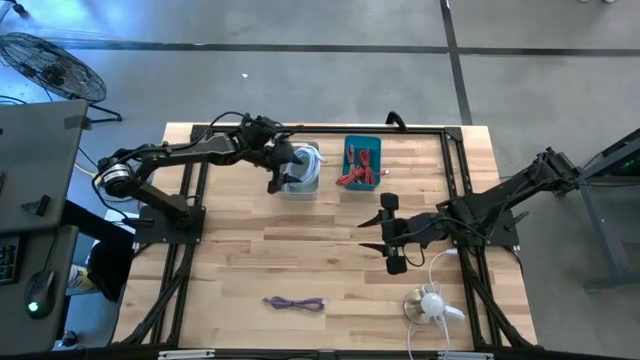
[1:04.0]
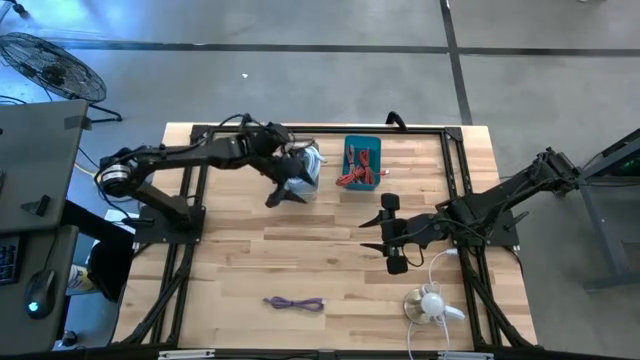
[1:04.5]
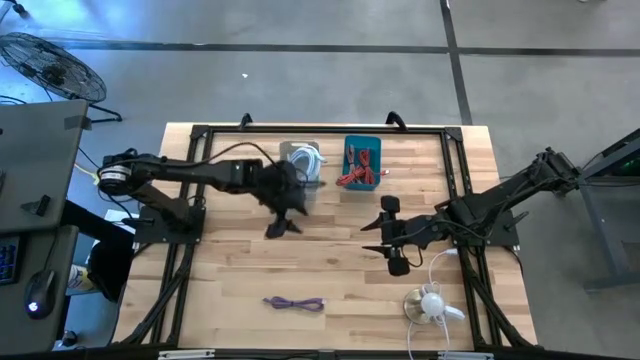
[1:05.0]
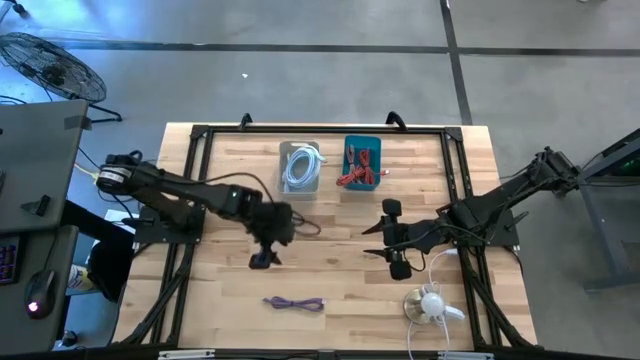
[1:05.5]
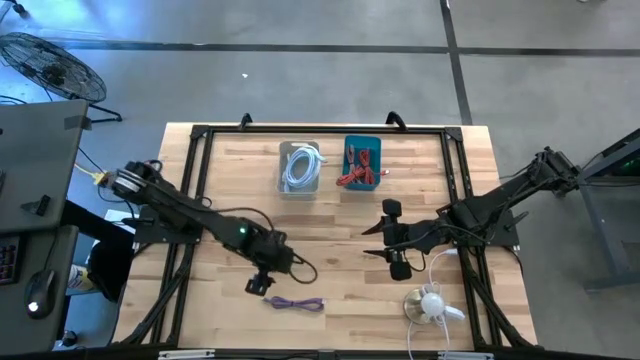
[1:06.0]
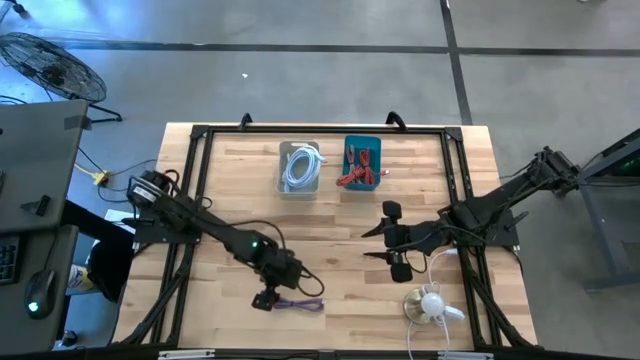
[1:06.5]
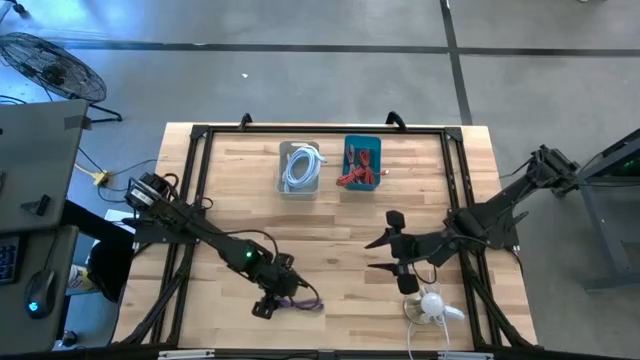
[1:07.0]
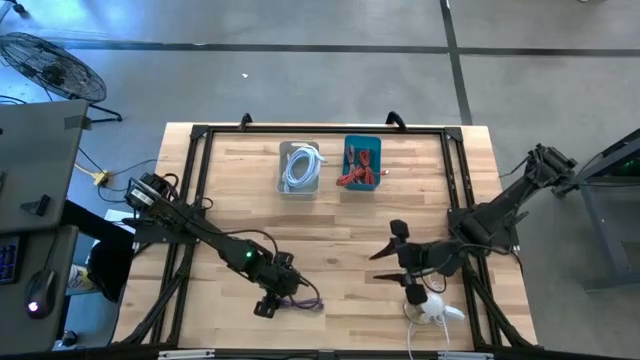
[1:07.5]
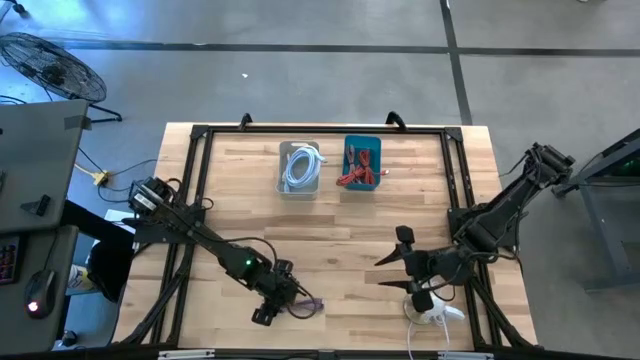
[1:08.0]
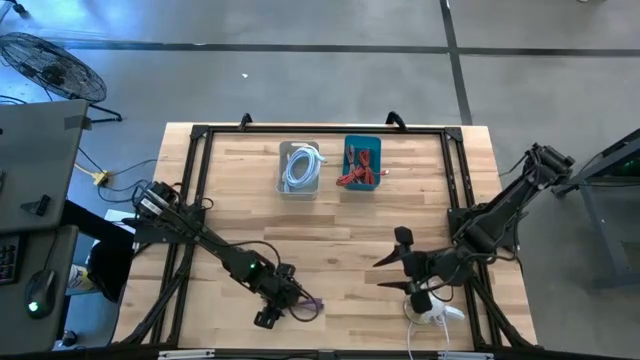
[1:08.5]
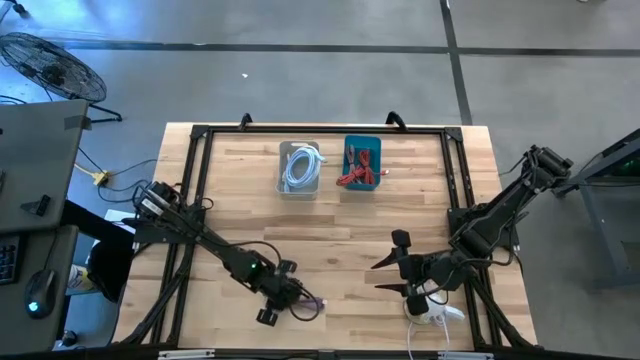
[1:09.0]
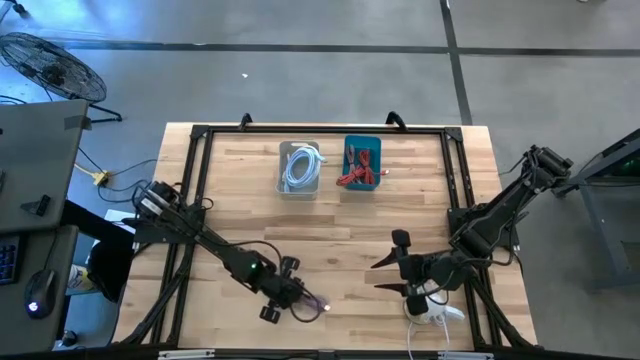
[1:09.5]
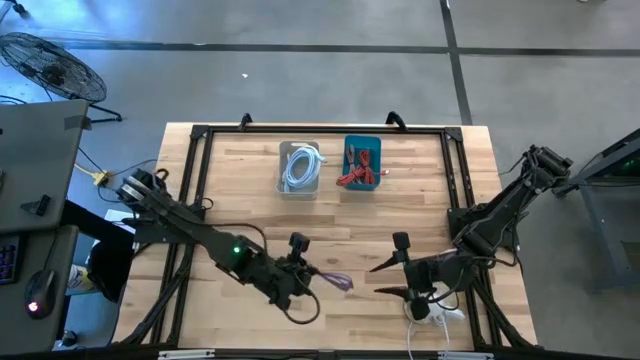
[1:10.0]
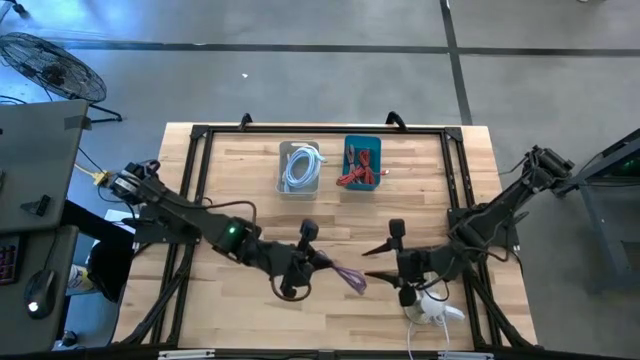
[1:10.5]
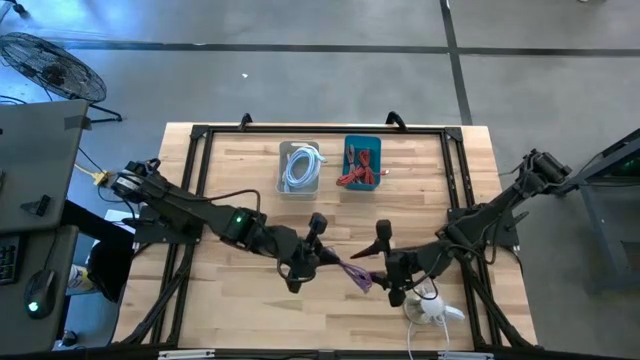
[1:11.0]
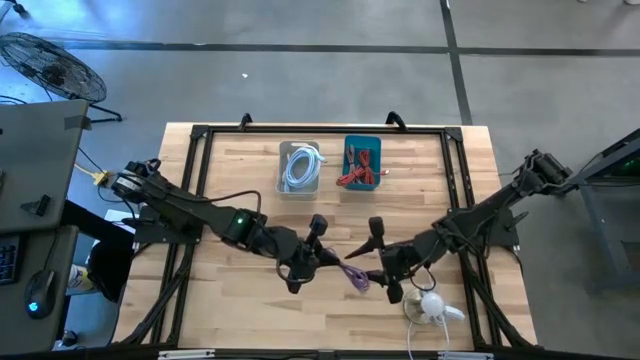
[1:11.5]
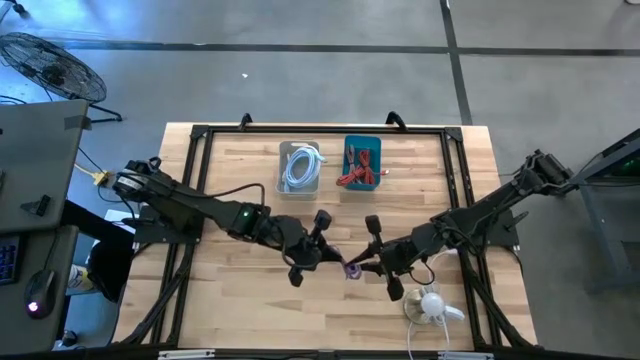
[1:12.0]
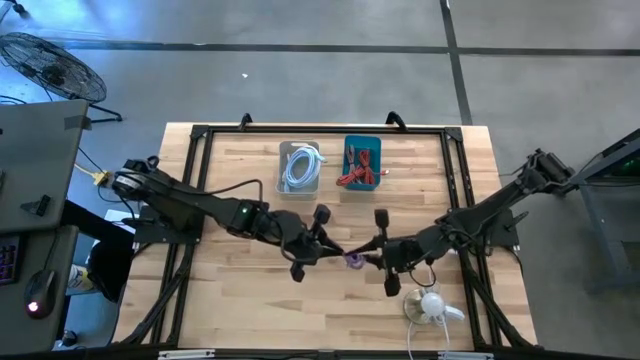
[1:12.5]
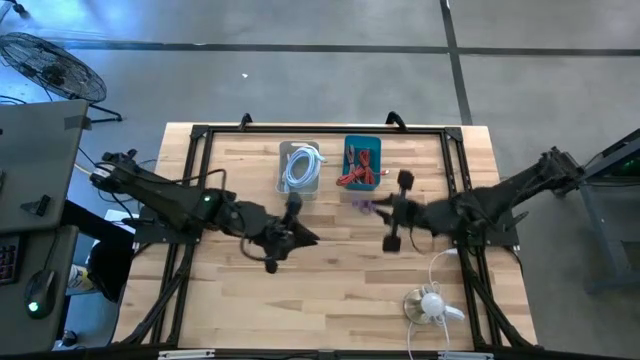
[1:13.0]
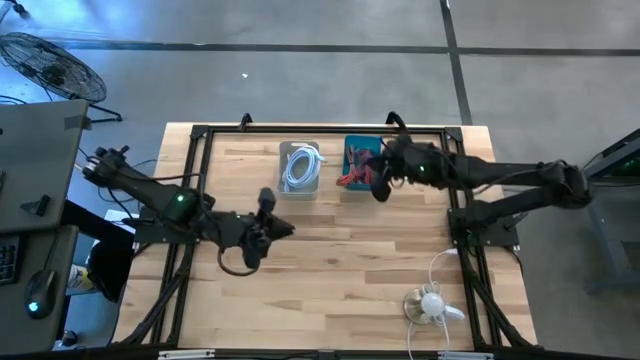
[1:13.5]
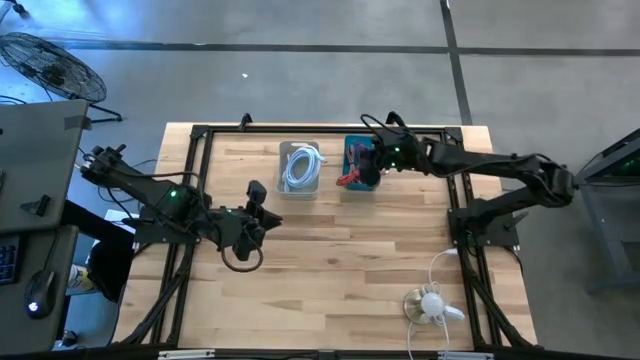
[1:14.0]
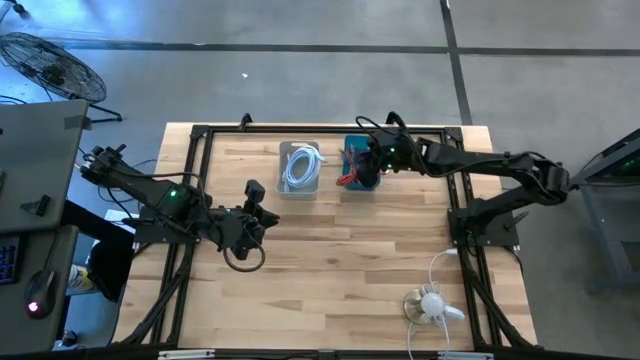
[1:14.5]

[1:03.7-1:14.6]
Task: Pick & Place USB Port
Put the violet charger cable into the blue bin

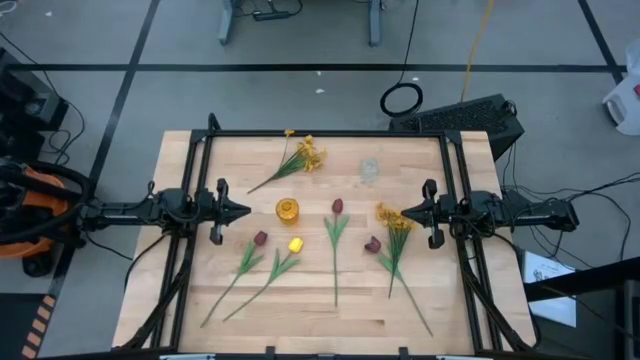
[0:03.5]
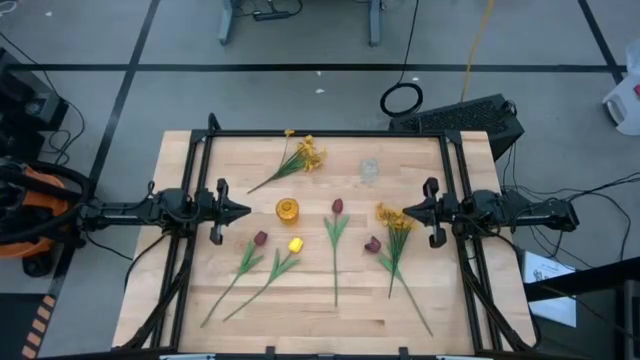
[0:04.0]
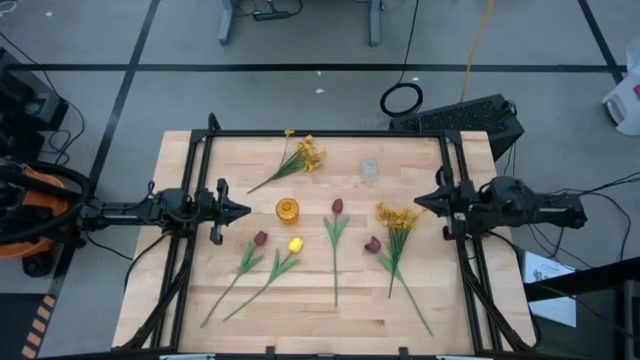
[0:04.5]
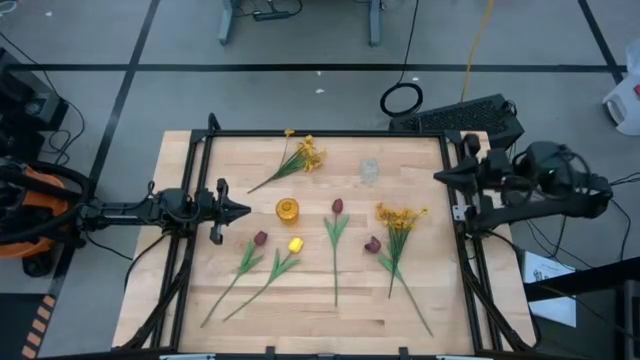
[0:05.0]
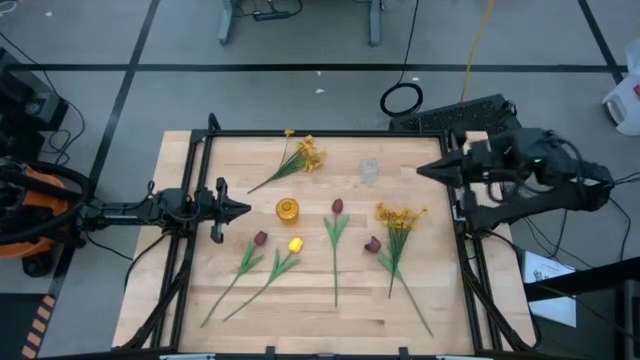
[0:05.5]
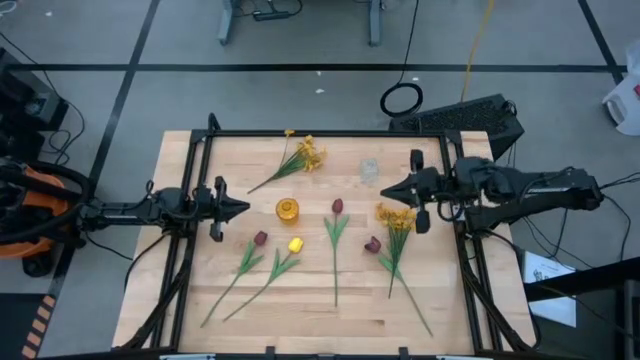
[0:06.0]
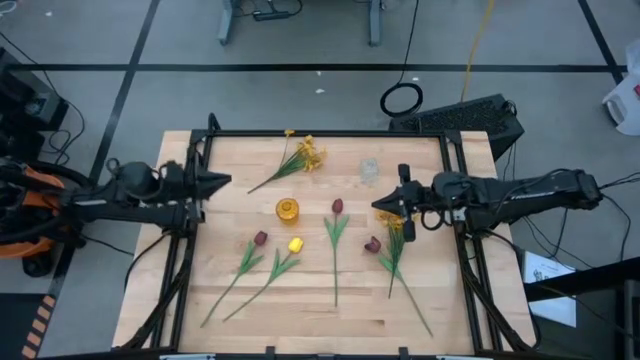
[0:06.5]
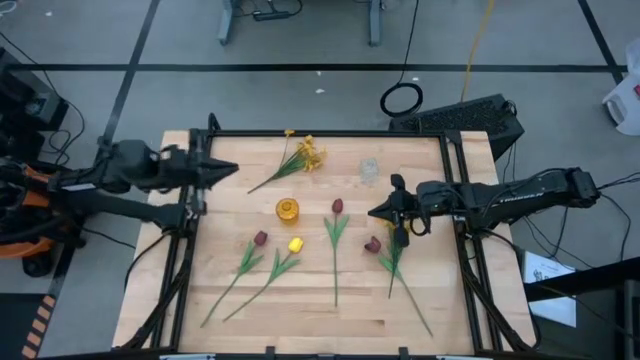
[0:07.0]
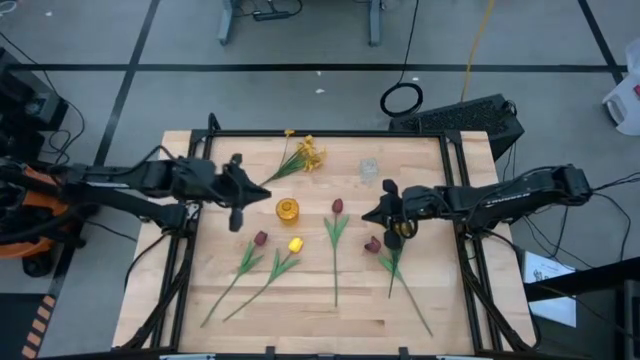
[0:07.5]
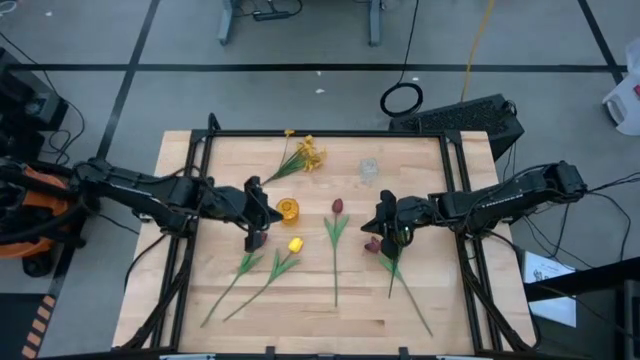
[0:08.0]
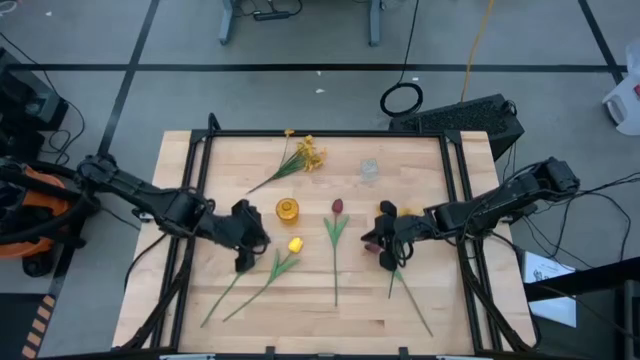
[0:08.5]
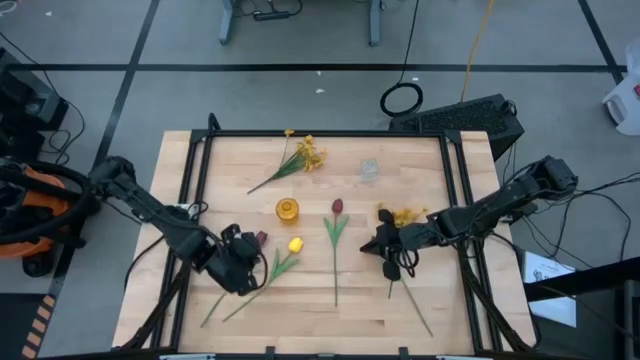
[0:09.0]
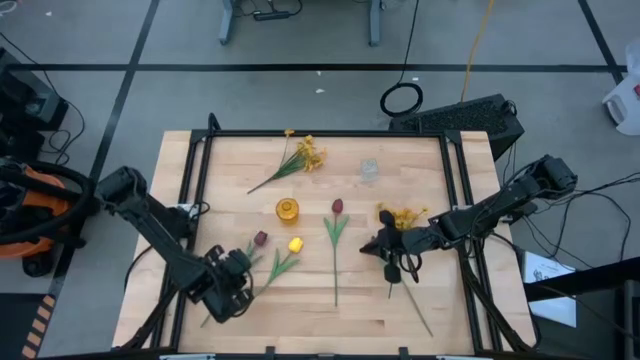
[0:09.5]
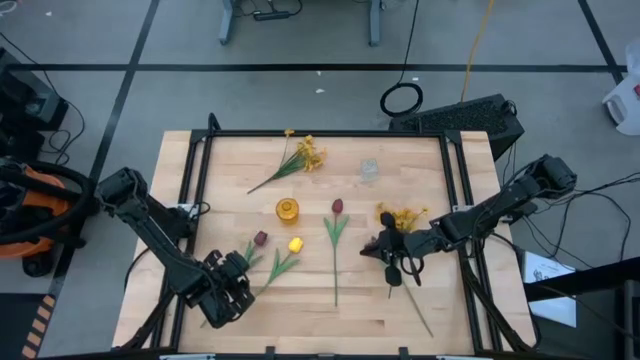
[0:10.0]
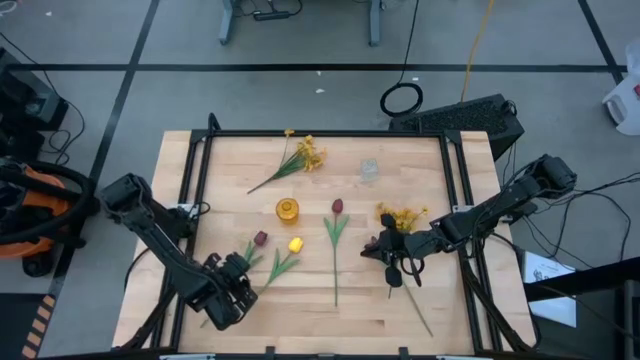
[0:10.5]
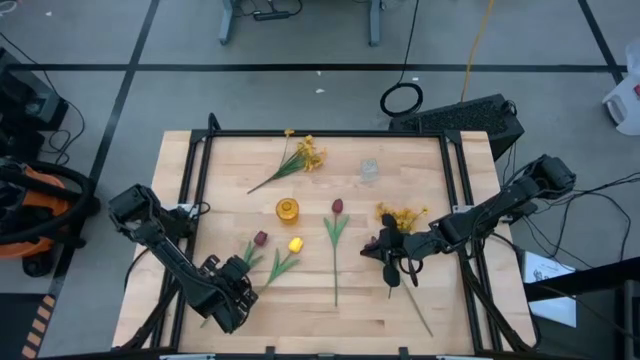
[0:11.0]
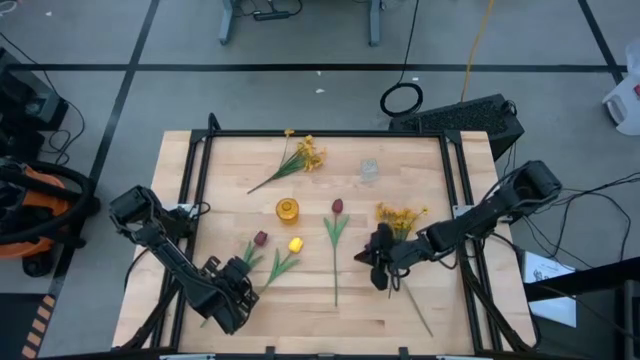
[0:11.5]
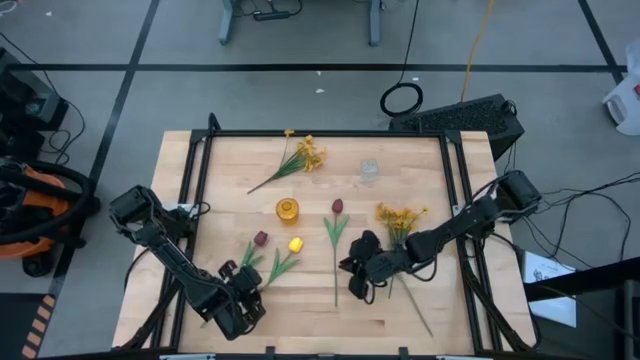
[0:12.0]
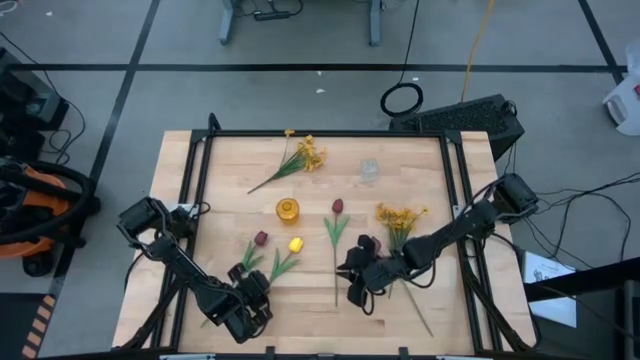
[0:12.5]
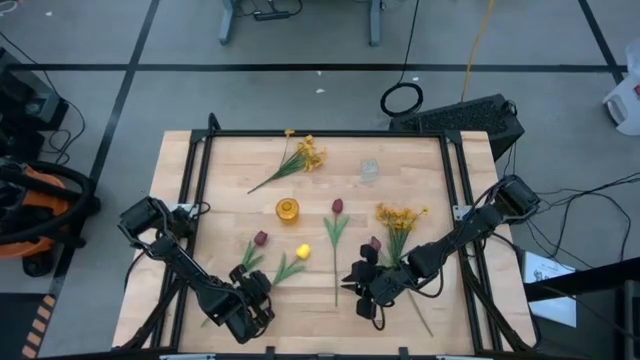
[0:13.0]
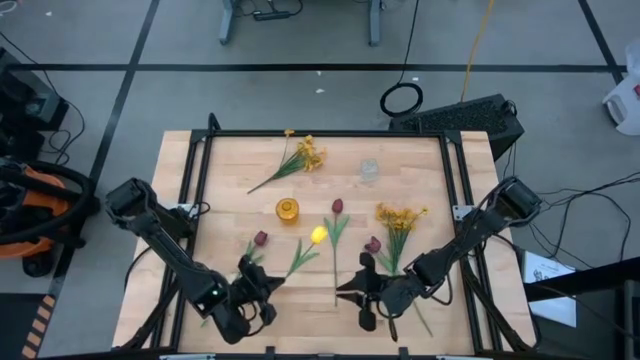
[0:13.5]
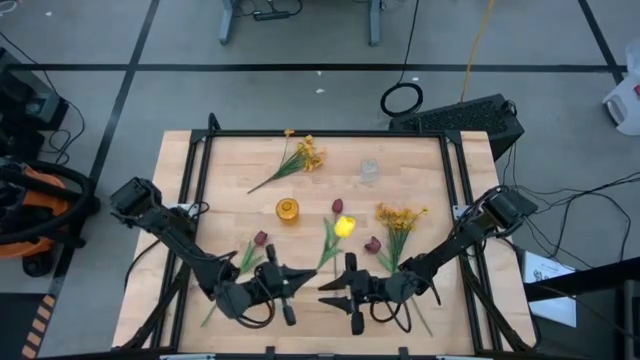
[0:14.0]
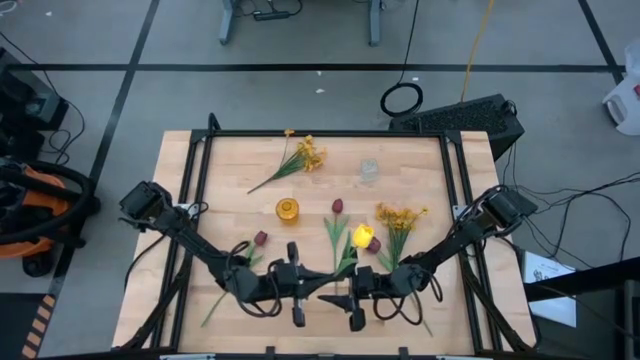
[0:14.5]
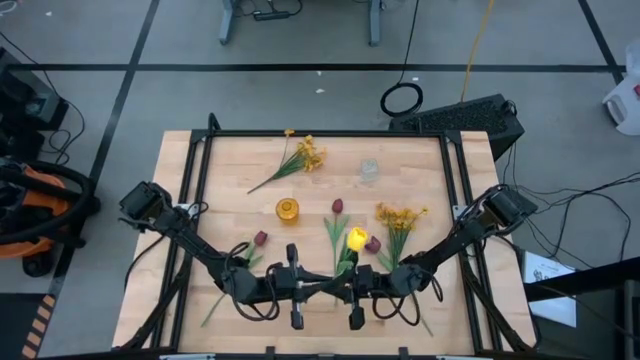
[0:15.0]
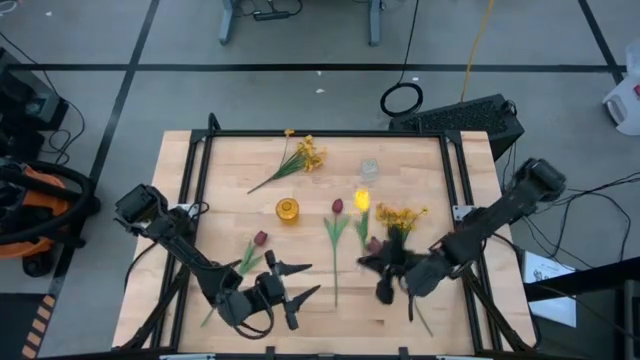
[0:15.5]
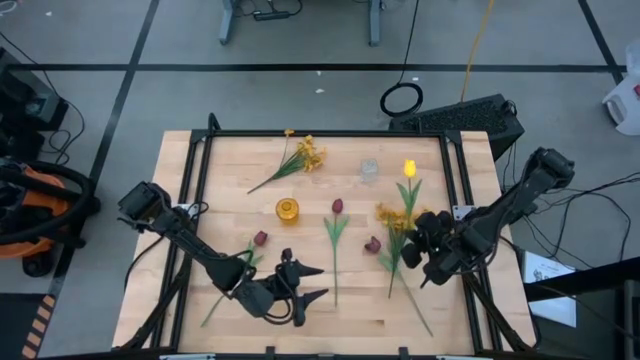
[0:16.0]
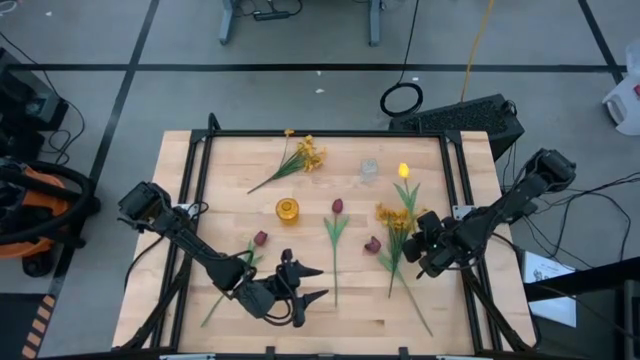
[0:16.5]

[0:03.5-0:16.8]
Task: Sort flowers into vase by color
Move the yellow tulip to the middle right of the table
